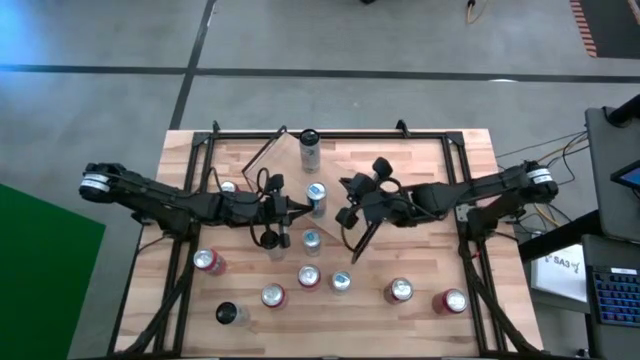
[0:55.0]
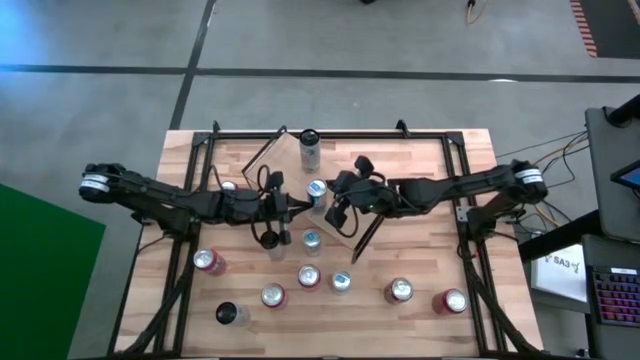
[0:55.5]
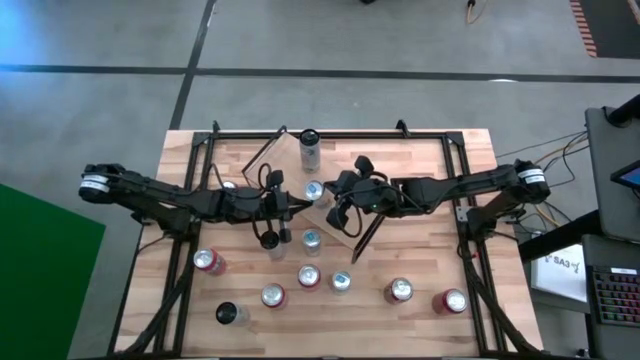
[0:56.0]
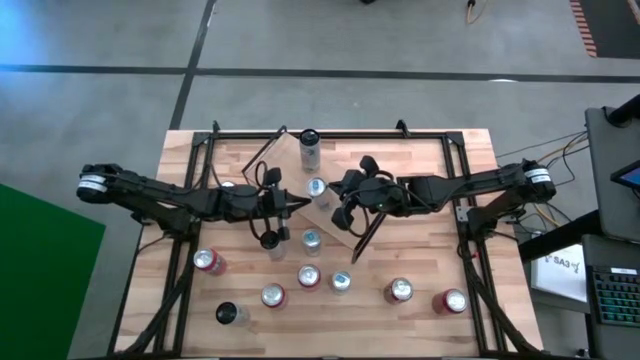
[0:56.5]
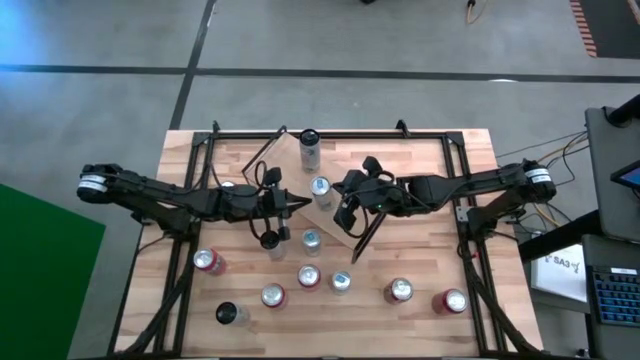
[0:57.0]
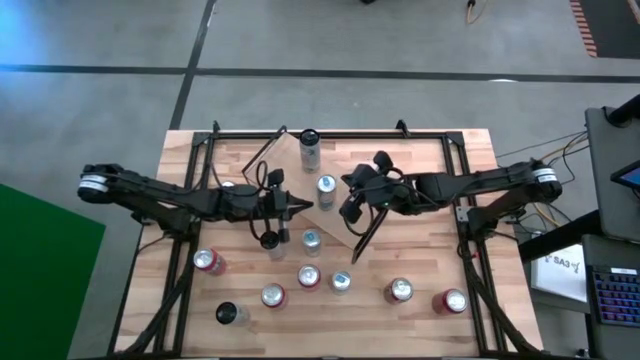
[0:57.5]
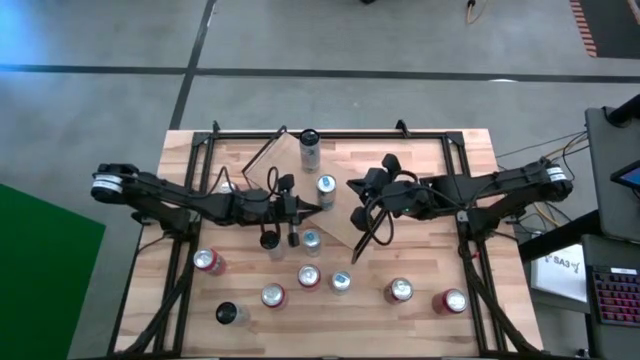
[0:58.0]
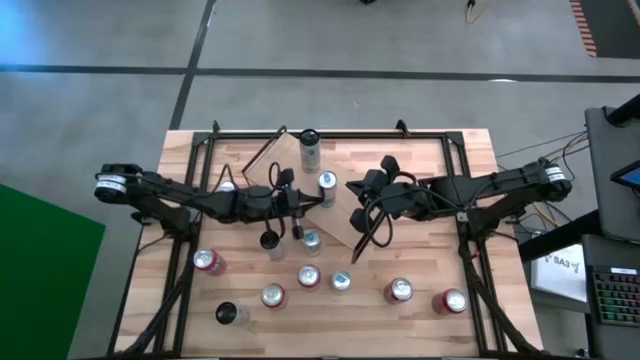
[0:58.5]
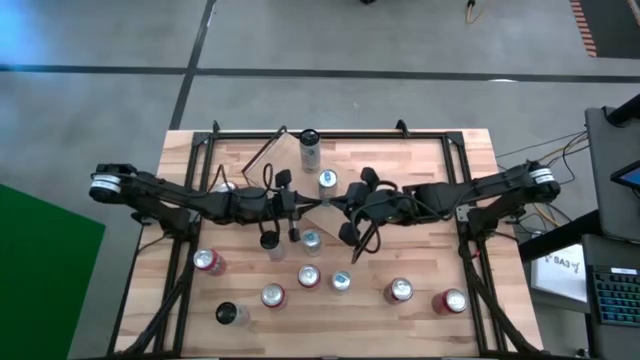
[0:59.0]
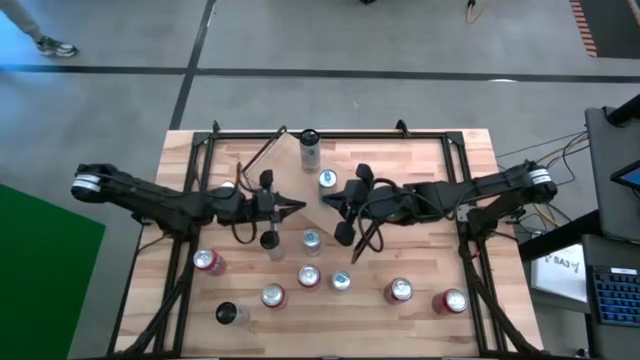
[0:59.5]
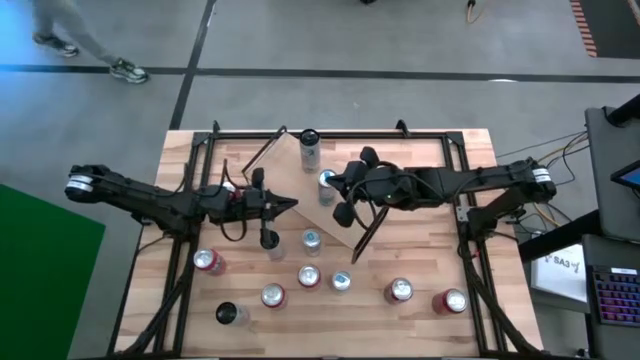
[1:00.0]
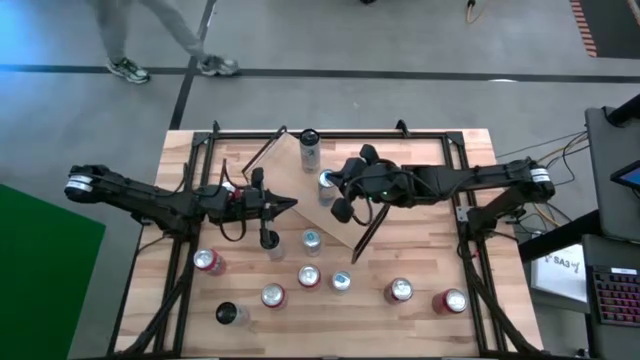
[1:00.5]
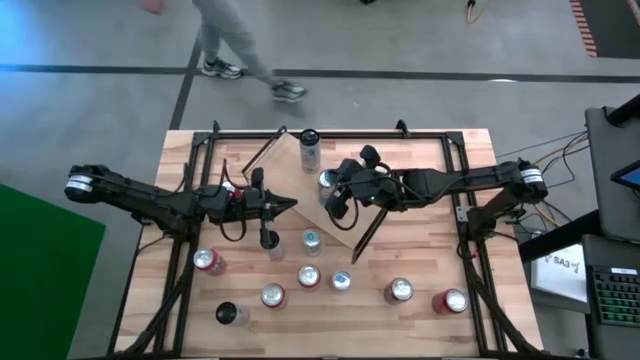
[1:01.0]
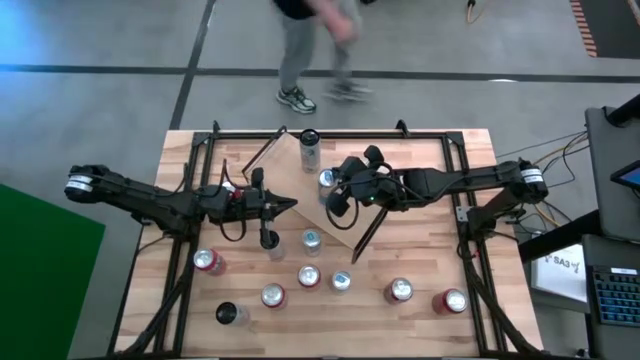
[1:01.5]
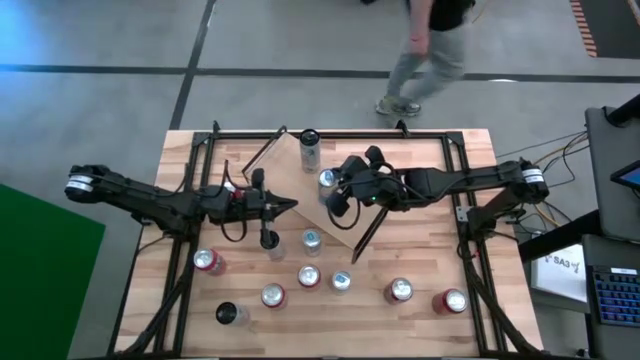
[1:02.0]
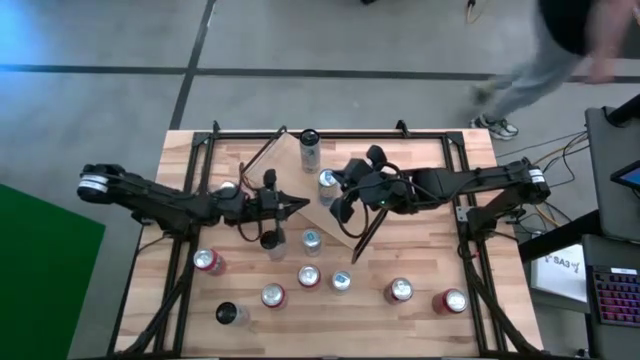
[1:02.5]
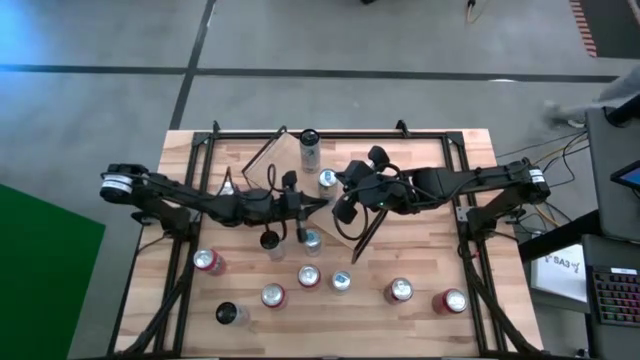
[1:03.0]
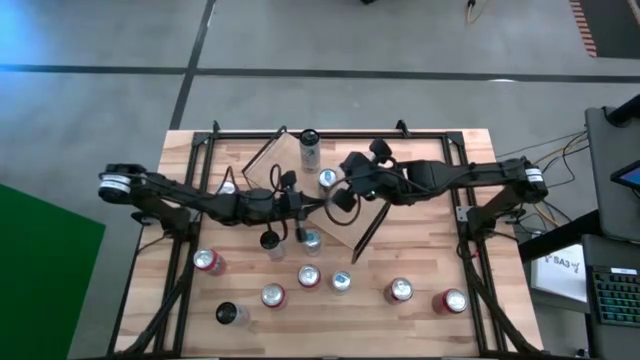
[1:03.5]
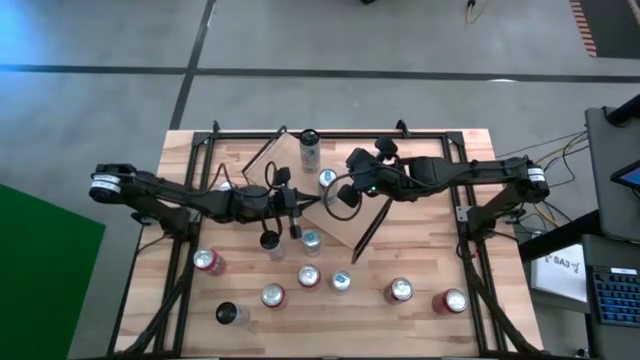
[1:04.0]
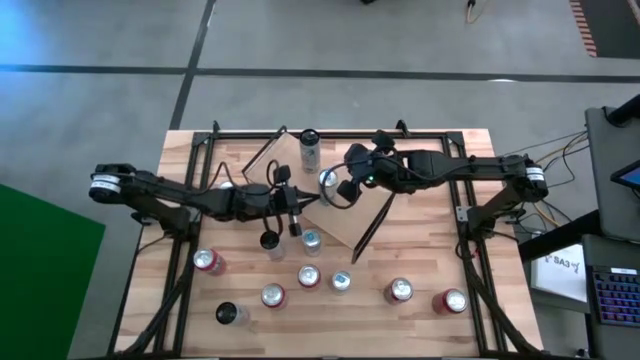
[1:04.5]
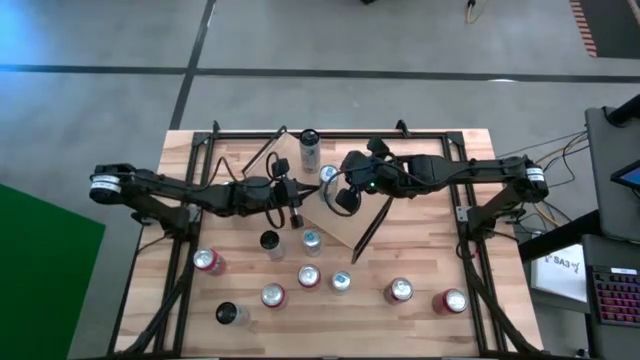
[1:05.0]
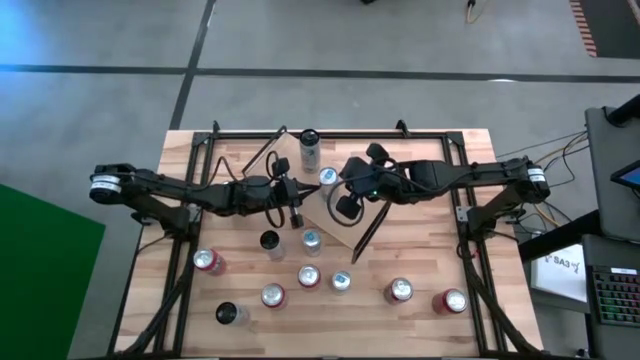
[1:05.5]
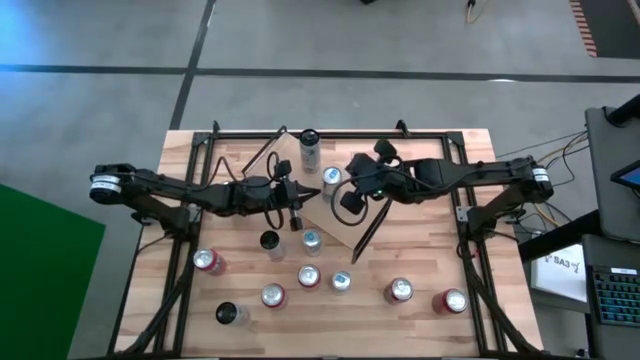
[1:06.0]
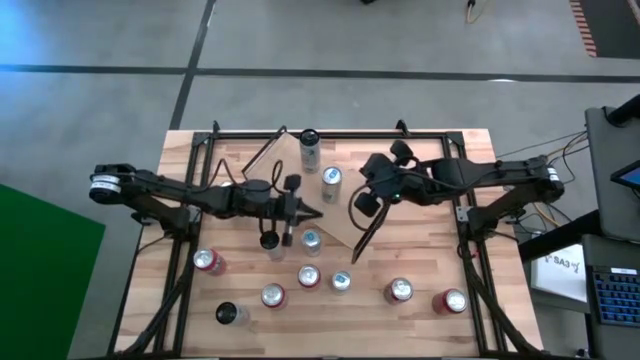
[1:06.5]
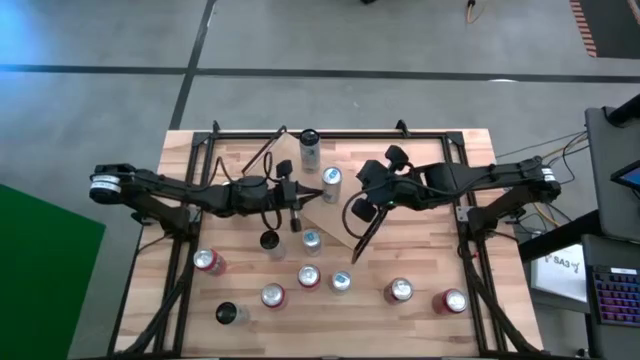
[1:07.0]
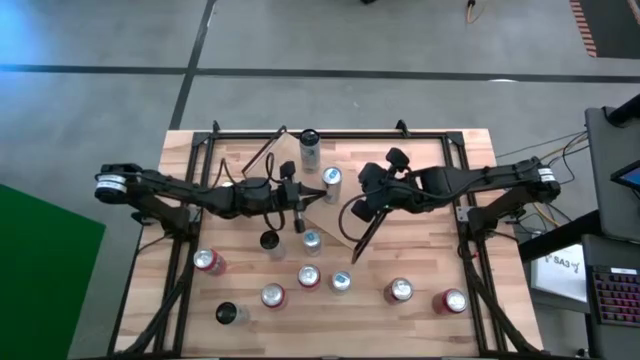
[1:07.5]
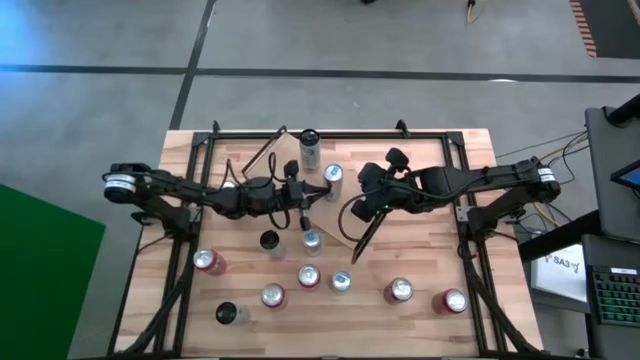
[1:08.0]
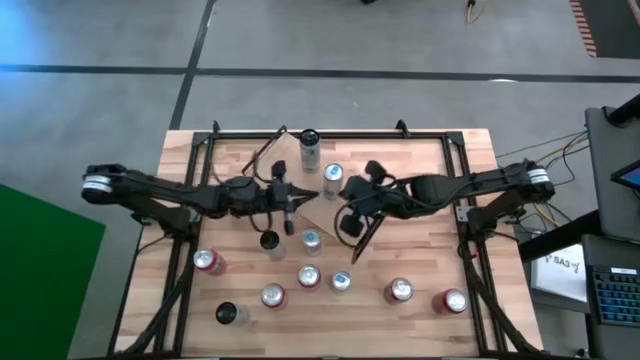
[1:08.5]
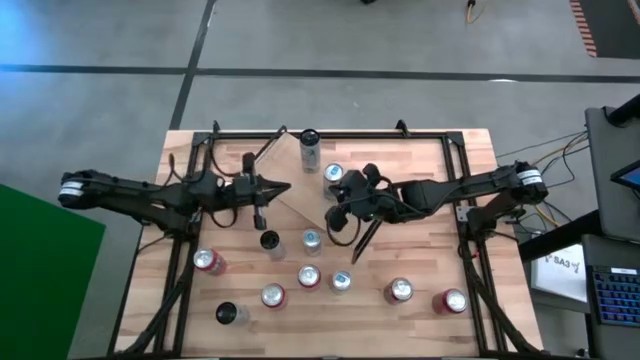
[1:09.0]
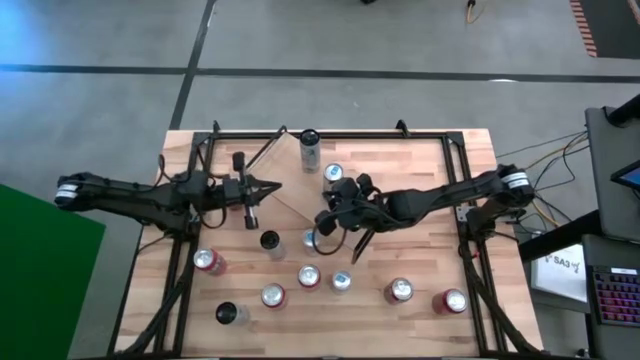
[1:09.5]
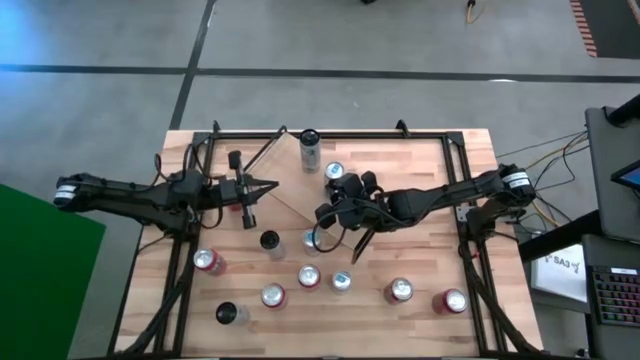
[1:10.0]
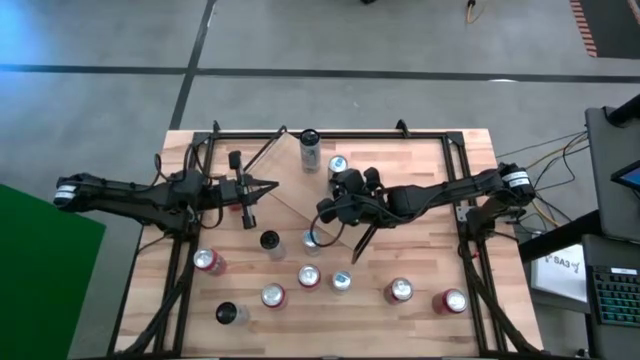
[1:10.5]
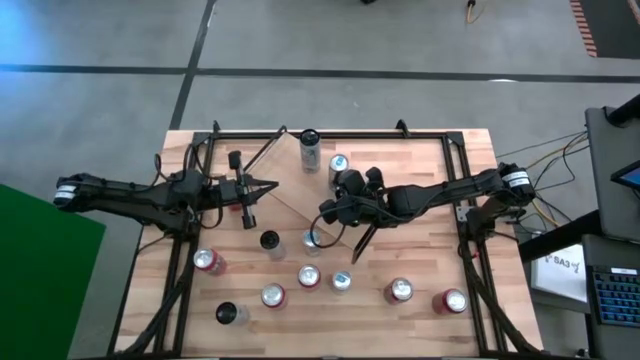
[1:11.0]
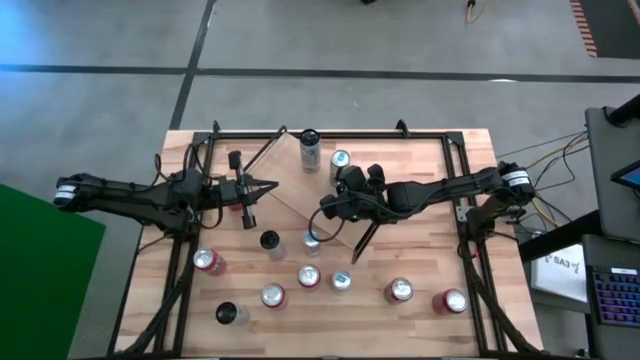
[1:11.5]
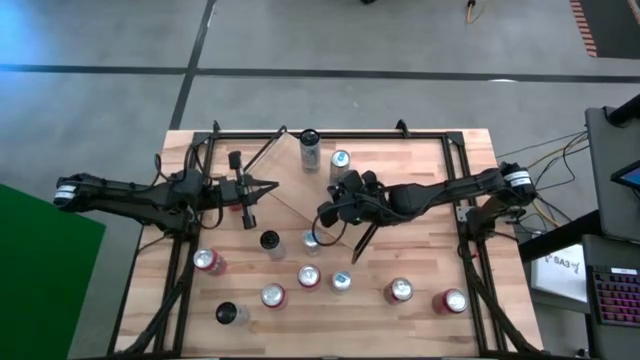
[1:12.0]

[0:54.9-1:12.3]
Task: Place canned beverage on shelf
Put the silver/blue soda can on the shelf

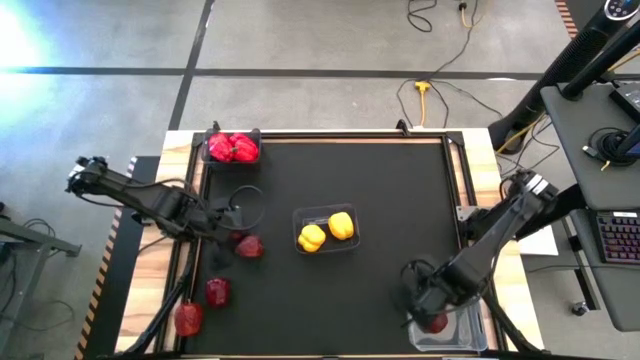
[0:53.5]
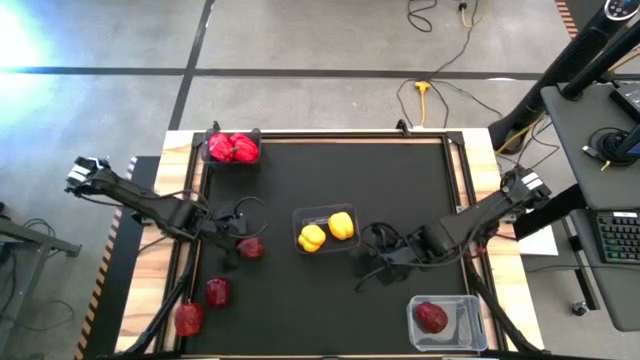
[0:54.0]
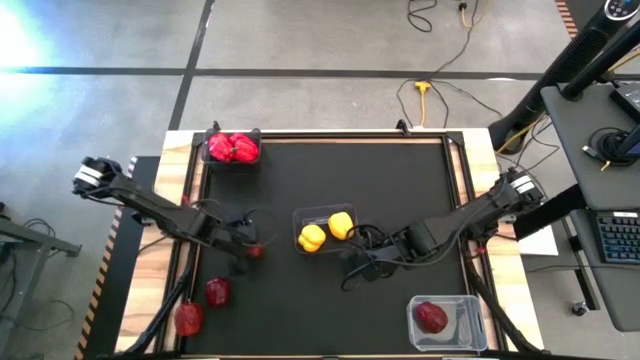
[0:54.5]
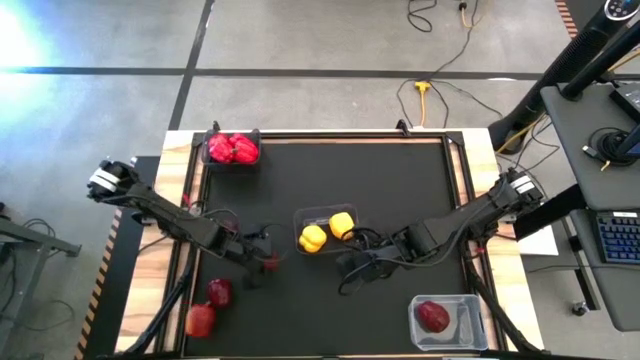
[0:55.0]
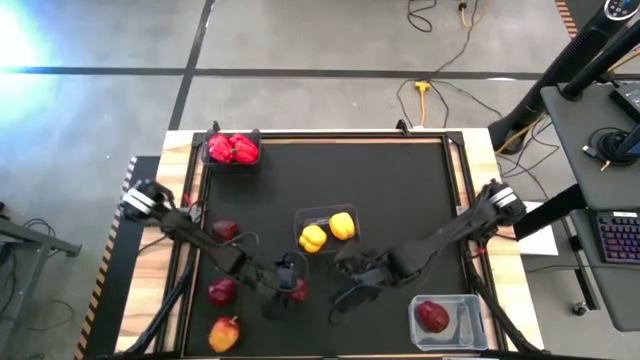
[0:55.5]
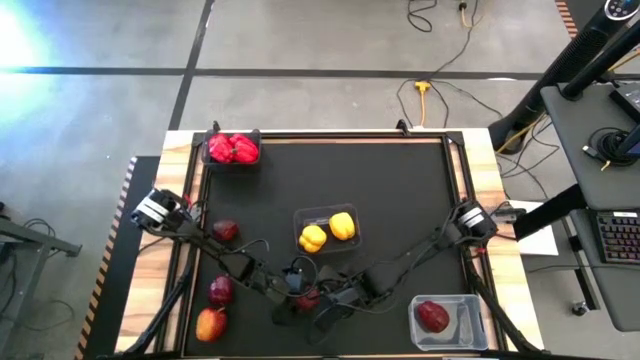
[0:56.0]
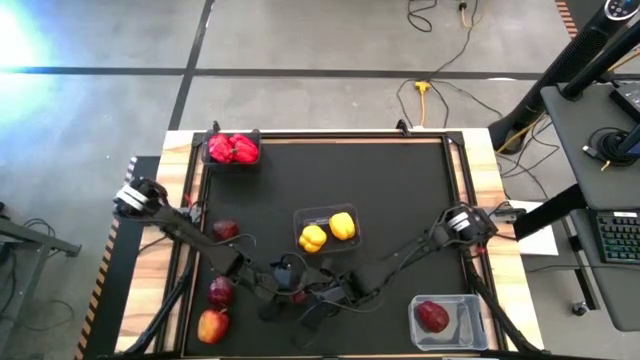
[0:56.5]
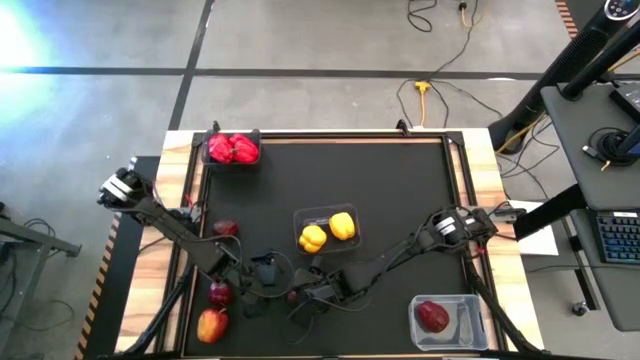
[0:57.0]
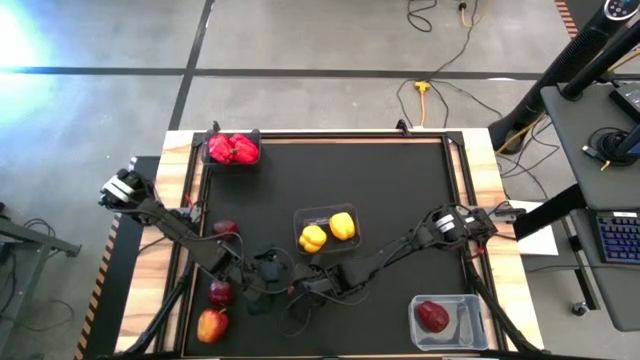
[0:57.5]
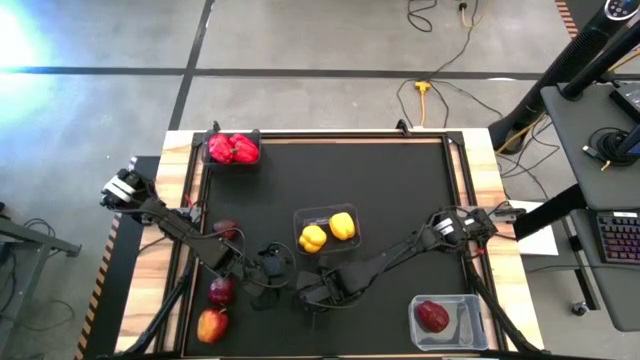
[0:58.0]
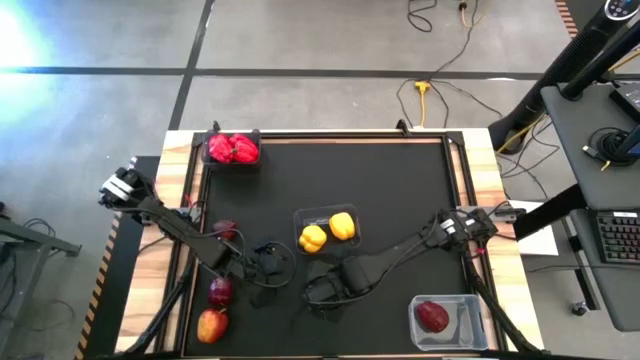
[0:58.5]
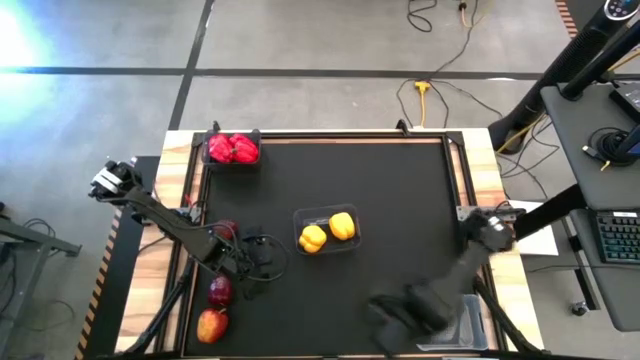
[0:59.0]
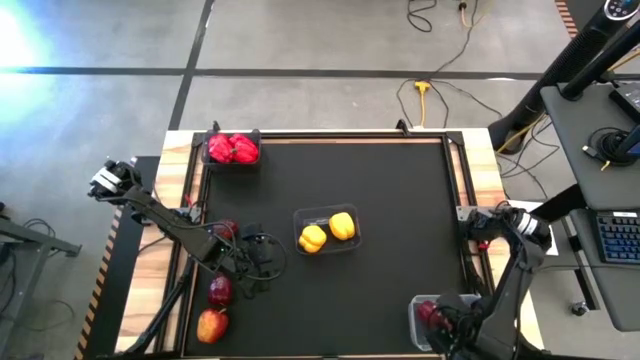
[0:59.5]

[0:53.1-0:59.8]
Task: Sort produce into baskets
Put the red apple into the transparent bin
